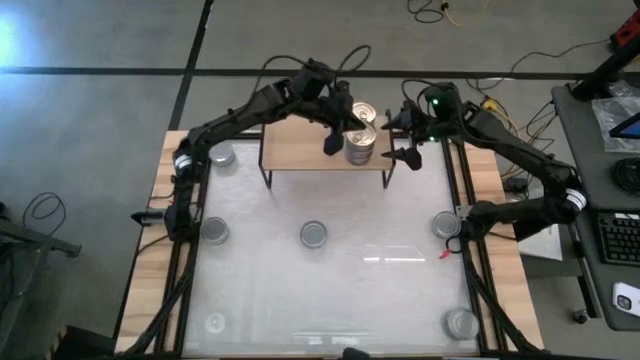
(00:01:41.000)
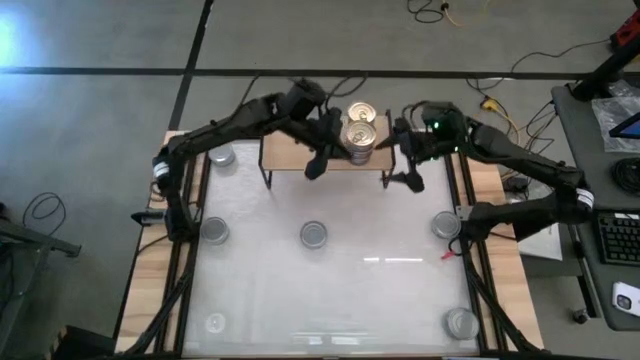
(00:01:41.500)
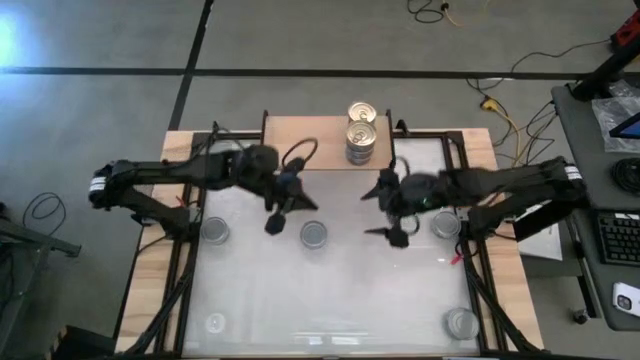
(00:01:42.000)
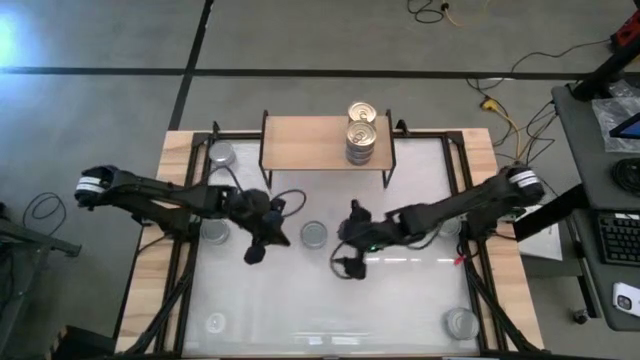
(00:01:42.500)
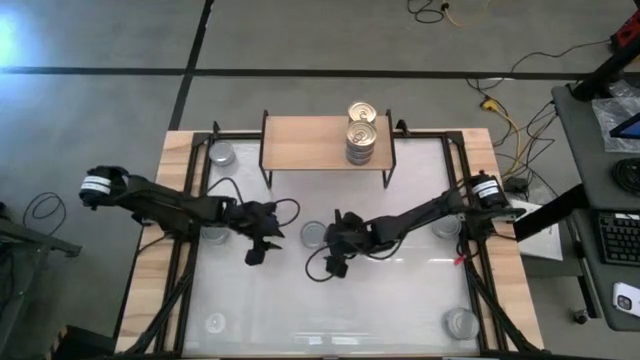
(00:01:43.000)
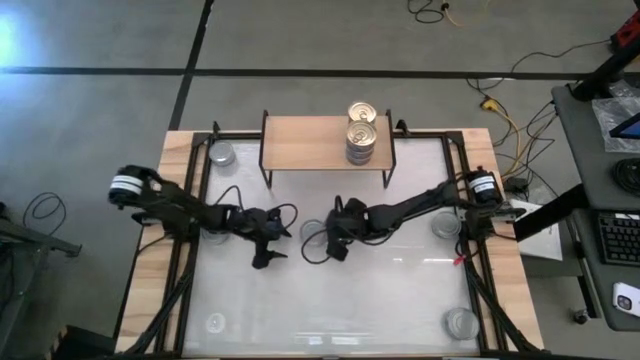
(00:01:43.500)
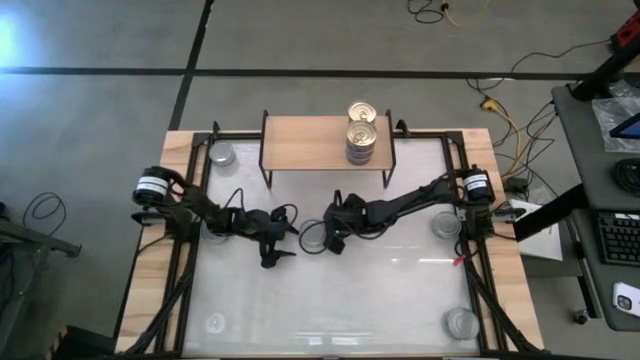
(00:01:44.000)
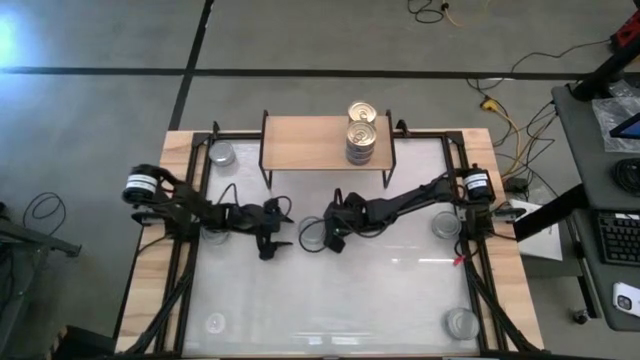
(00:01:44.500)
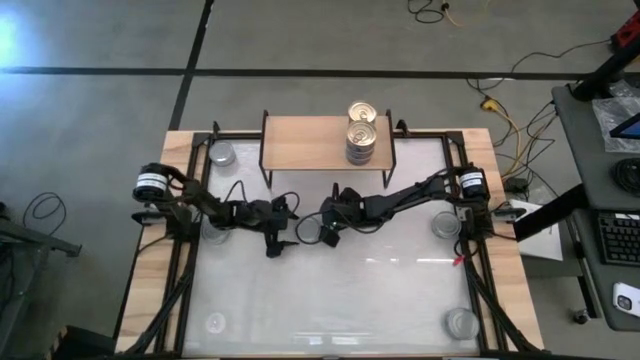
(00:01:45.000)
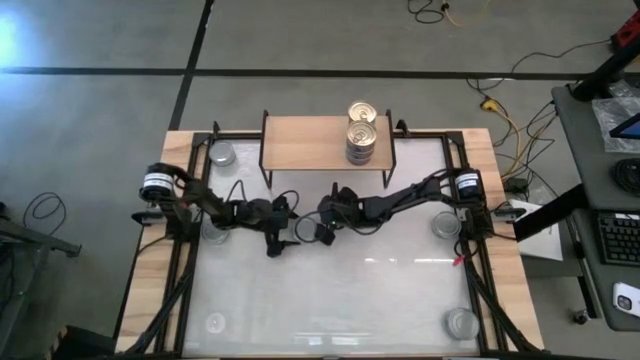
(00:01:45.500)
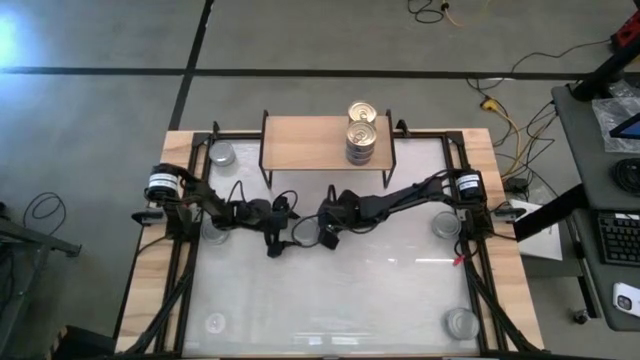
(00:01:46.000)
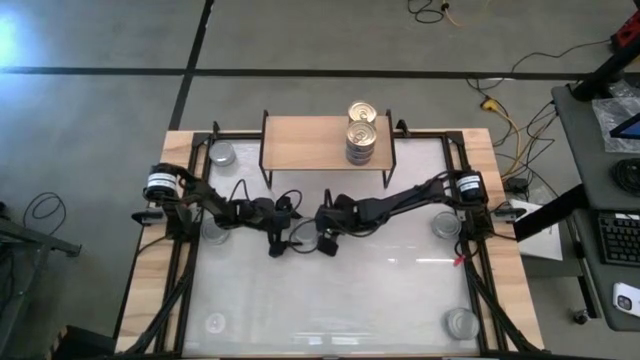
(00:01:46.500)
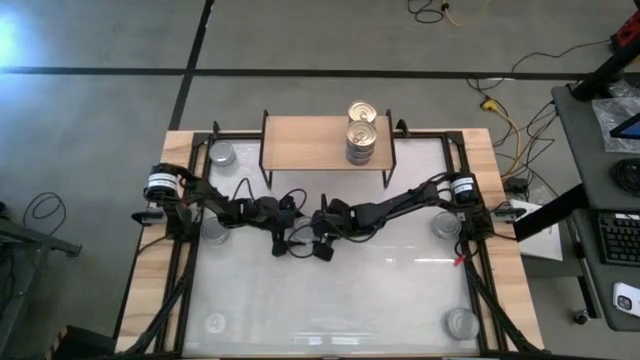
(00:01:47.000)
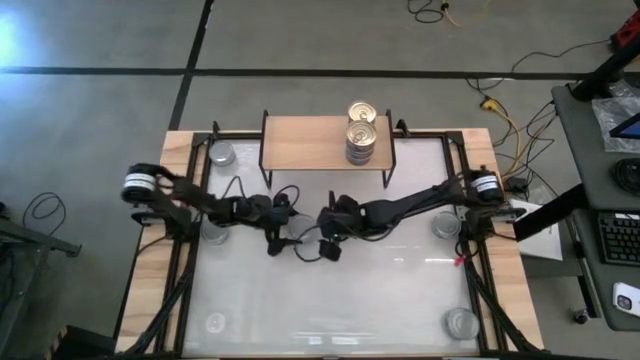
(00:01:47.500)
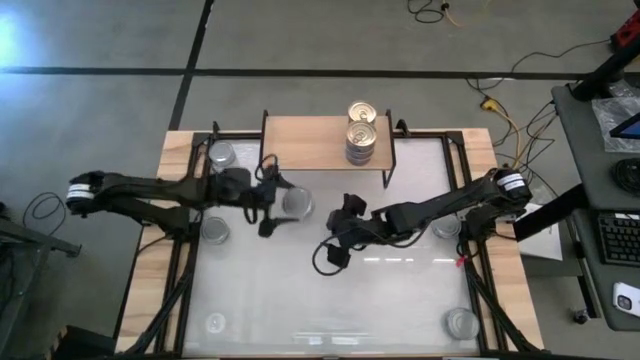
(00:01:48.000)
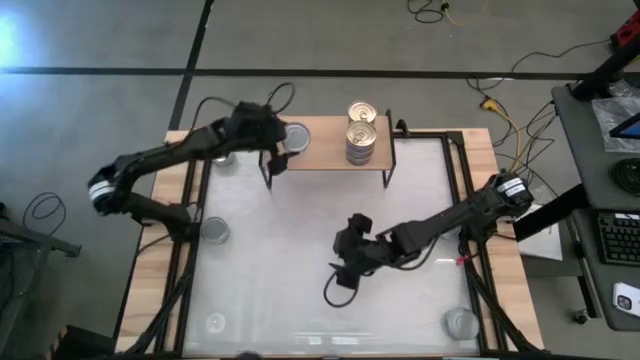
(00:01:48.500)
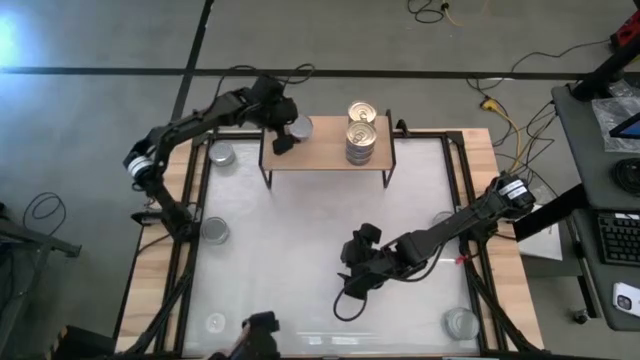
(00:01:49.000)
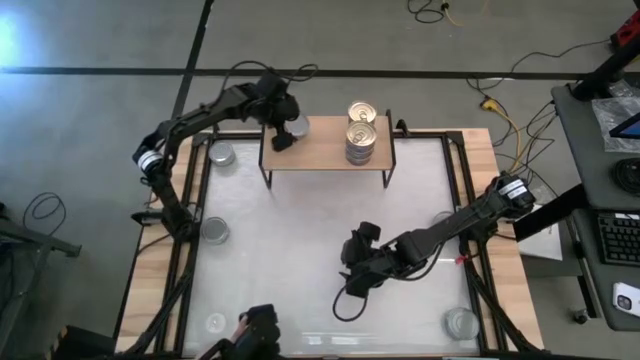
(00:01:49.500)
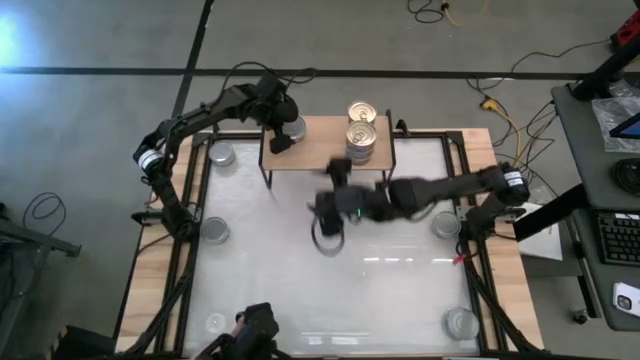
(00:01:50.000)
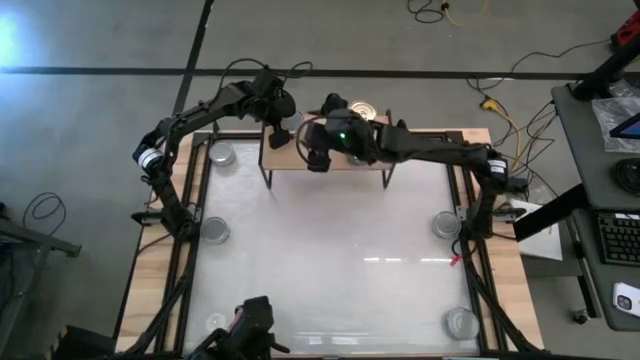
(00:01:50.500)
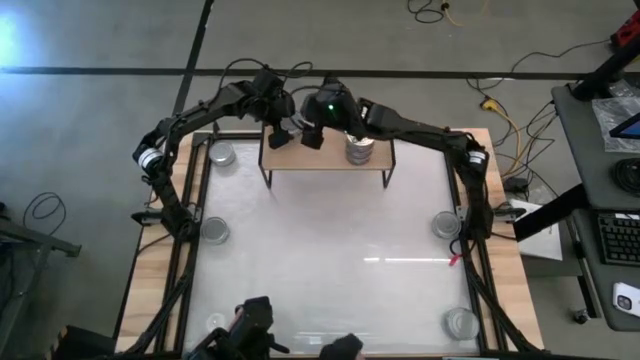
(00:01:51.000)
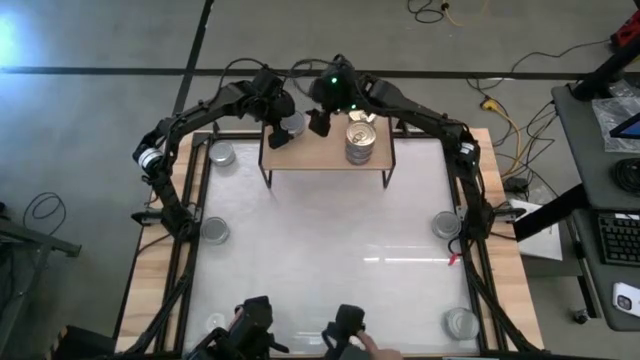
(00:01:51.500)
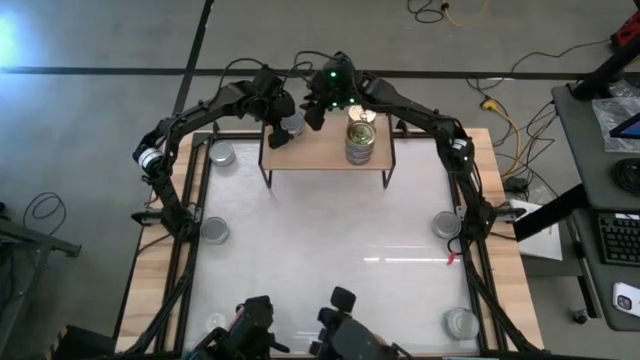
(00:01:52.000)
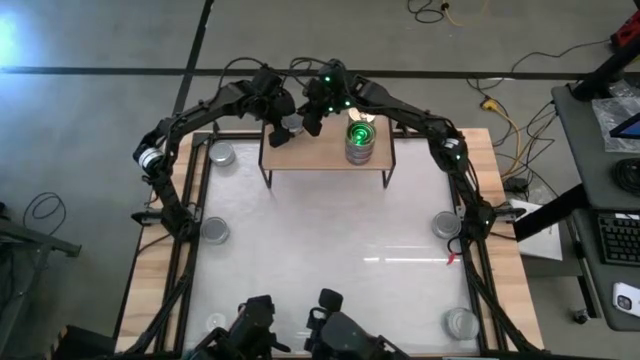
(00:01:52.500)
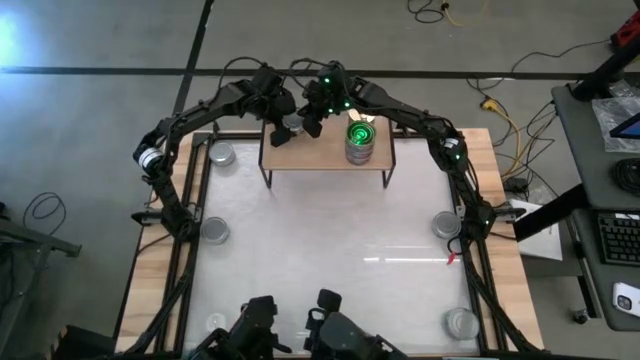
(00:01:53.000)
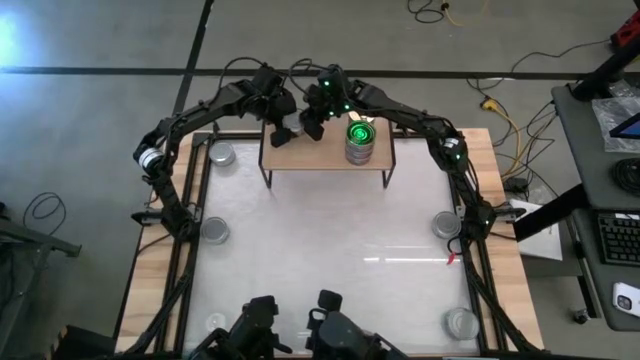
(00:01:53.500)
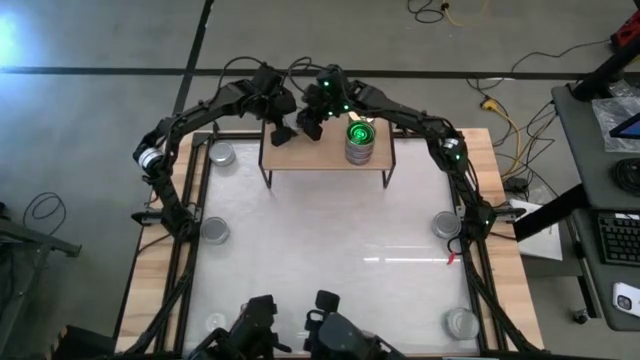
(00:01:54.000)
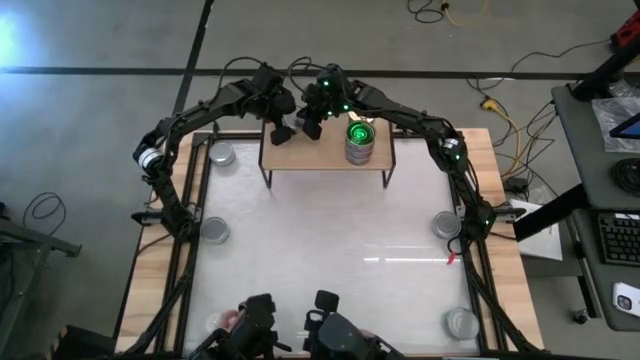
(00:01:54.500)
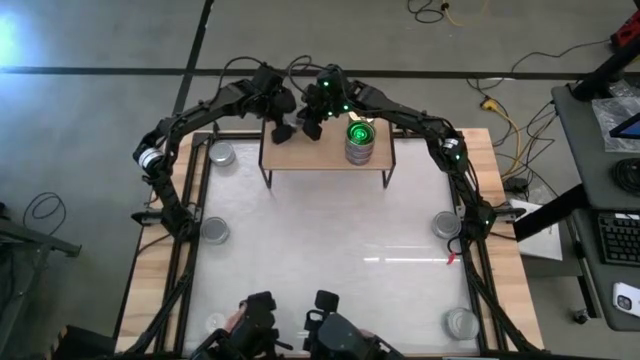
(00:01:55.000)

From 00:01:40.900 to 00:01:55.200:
Task: Stack canned seafood by type on shelf
Put the green tuna on the shelf

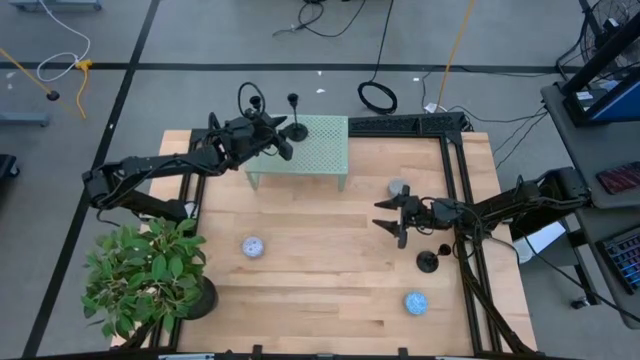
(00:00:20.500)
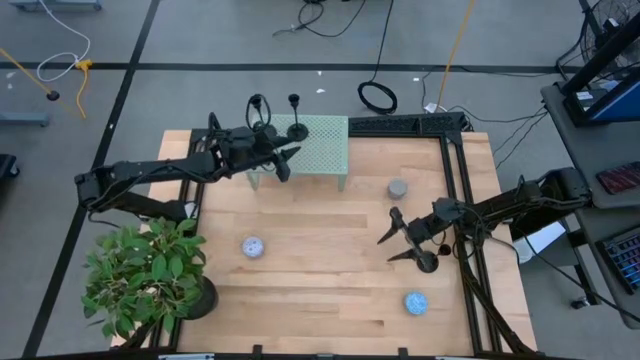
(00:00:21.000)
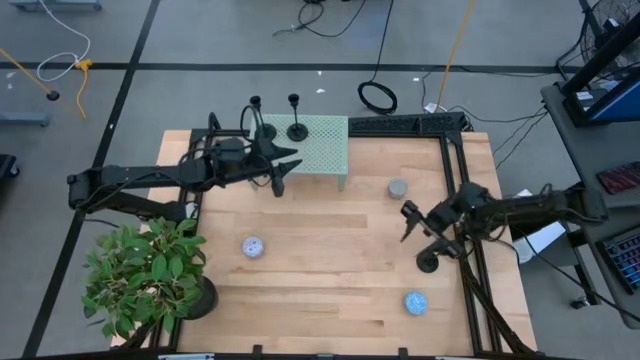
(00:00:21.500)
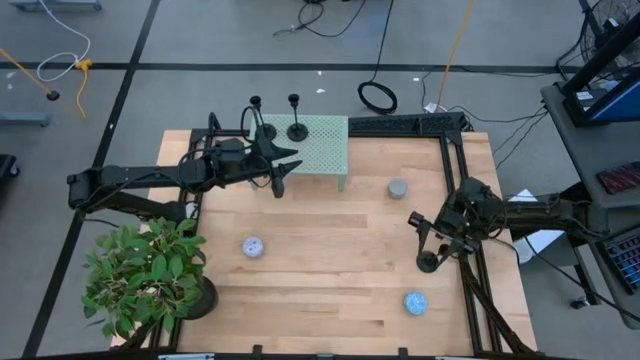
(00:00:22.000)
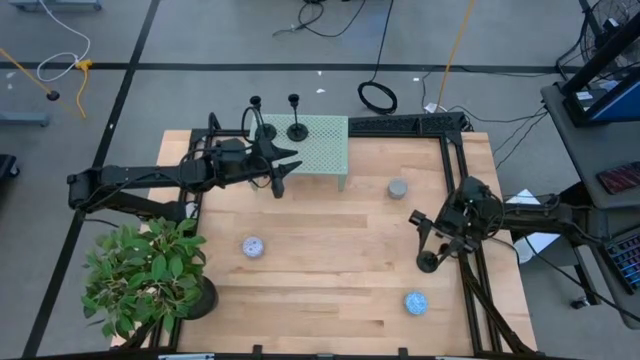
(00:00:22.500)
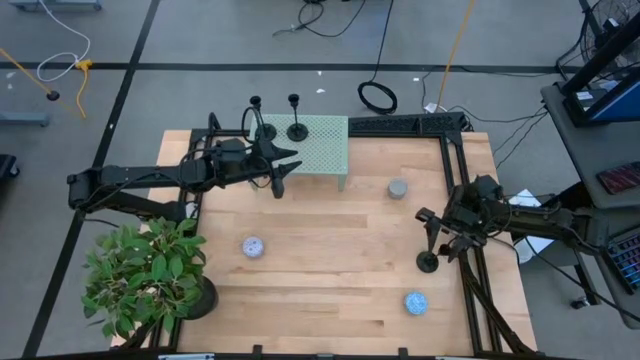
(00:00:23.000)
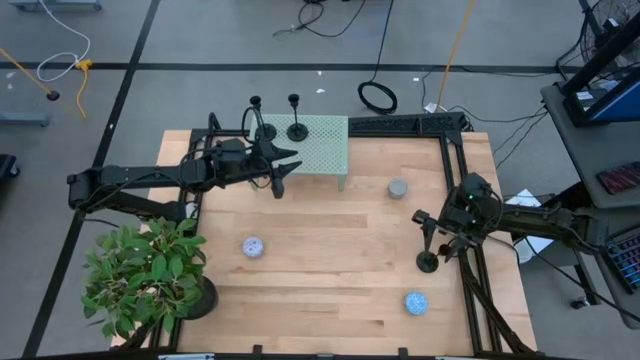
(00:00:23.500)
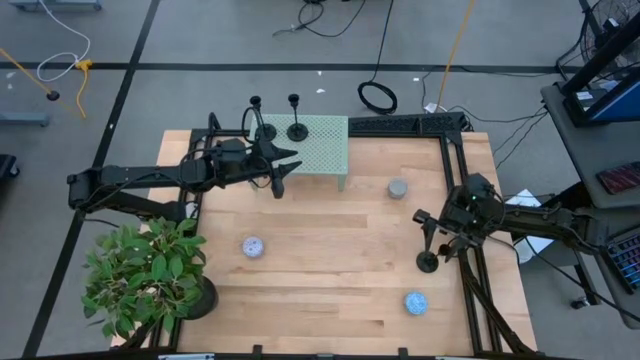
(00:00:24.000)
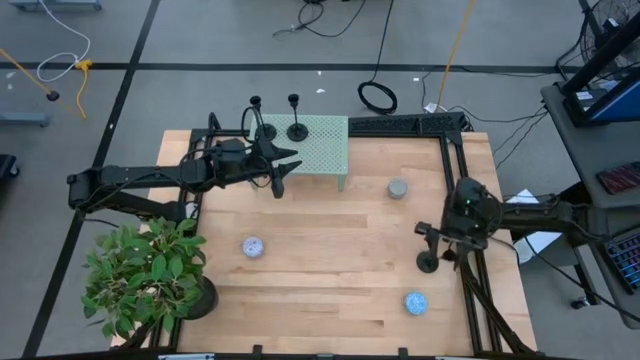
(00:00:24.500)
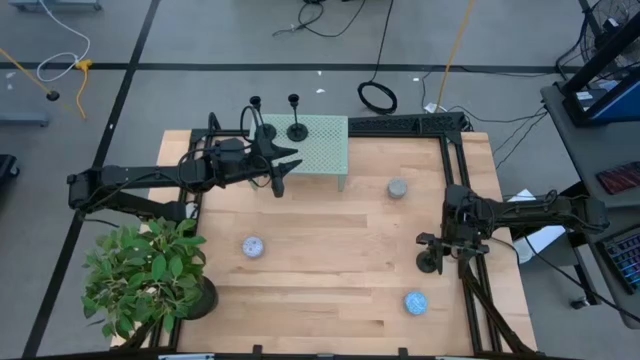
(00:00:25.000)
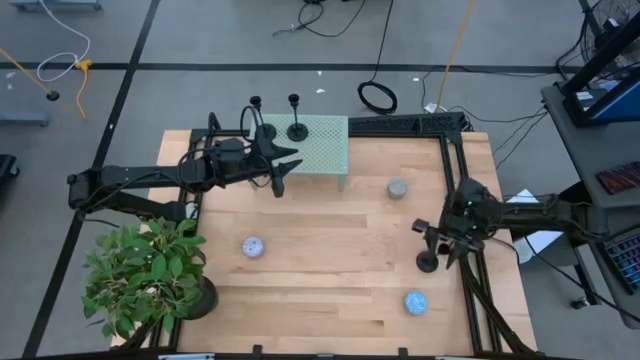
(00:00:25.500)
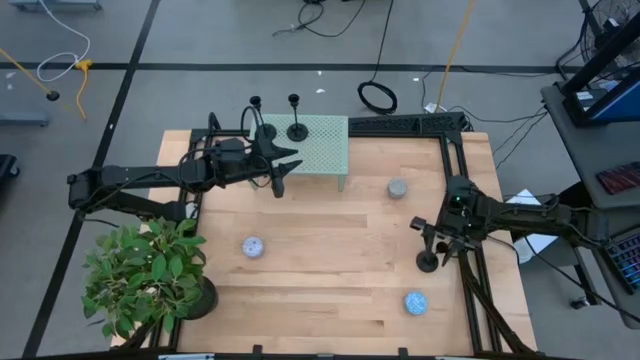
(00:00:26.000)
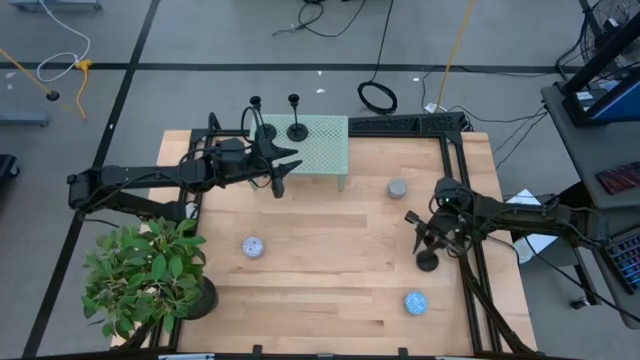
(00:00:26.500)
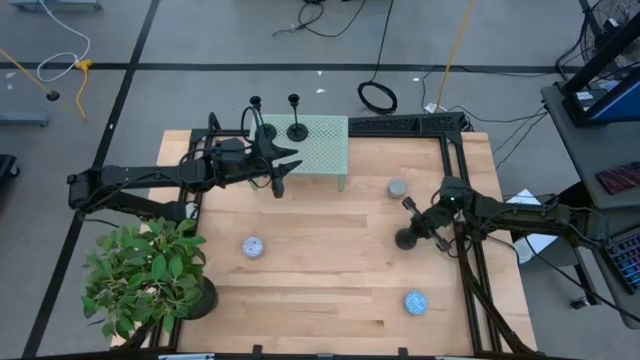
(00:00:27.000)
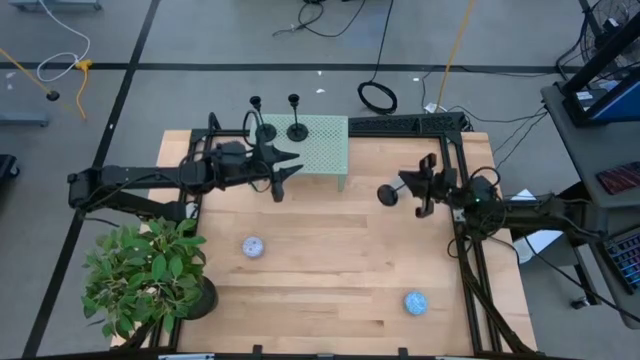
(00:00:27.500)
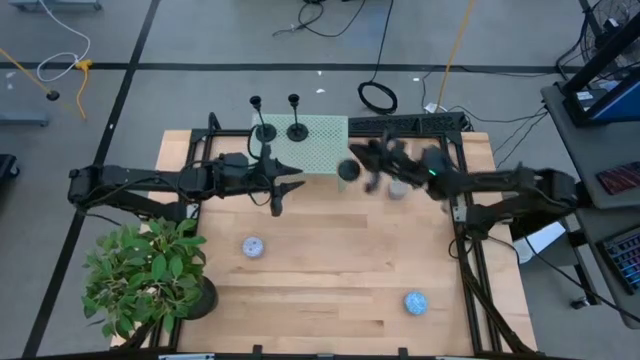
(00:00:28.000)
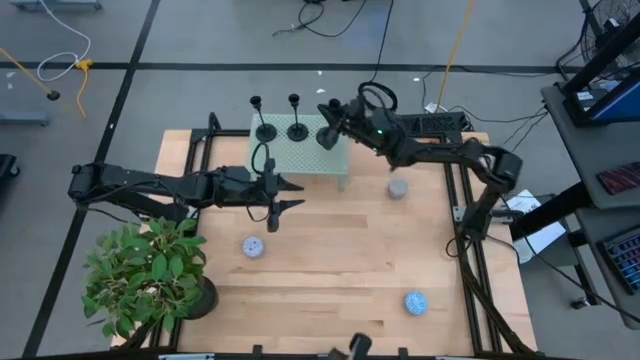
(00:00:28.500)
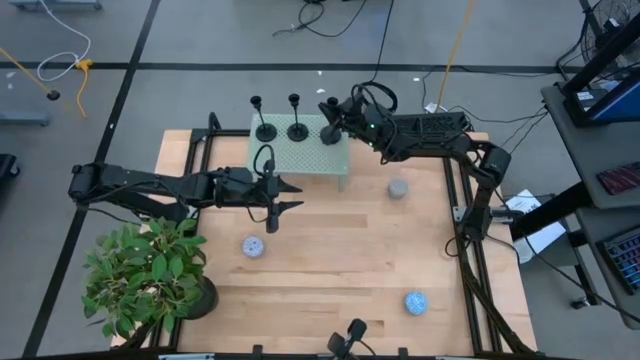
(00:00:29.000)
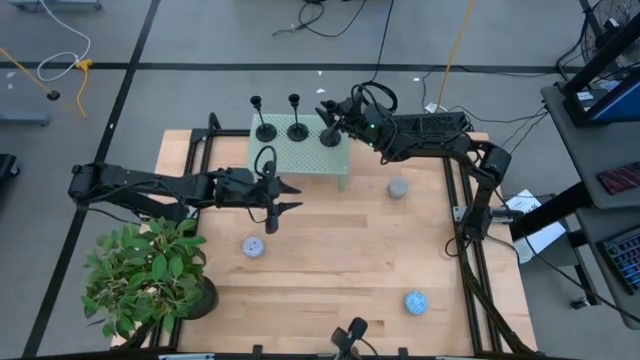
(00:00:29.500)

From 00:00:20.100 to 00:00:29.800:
Task: Pick & Place candle stick holders
Put the black candle holder on the shelf
